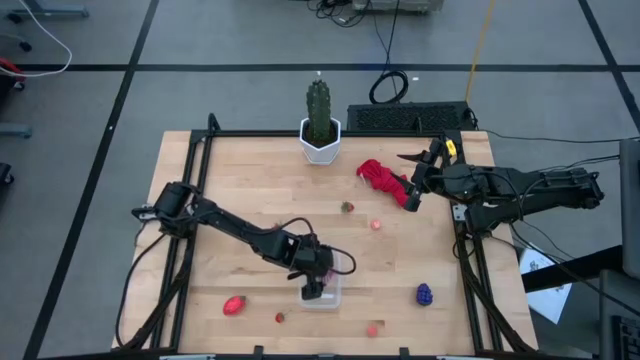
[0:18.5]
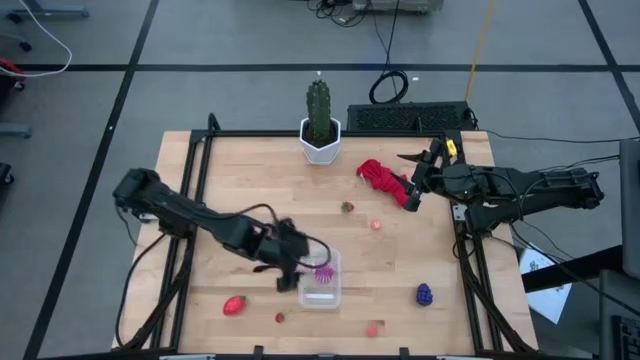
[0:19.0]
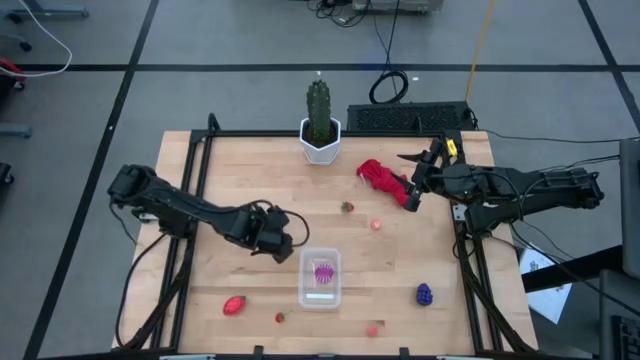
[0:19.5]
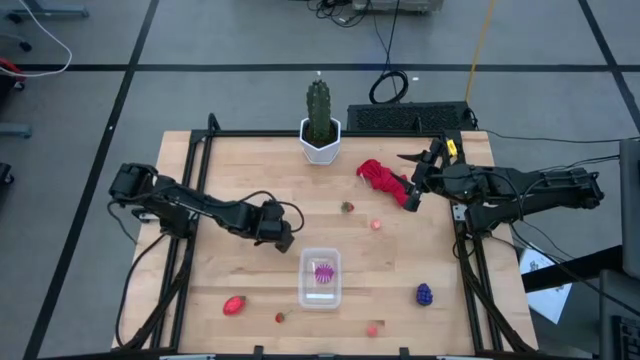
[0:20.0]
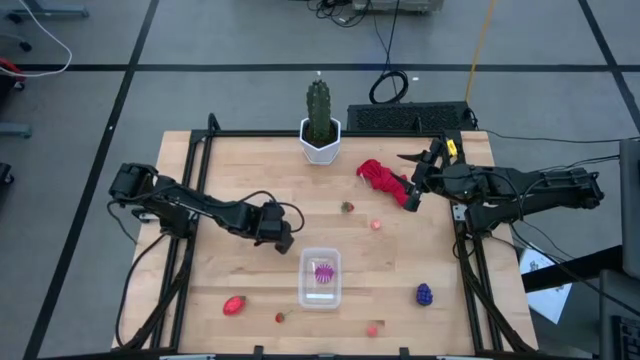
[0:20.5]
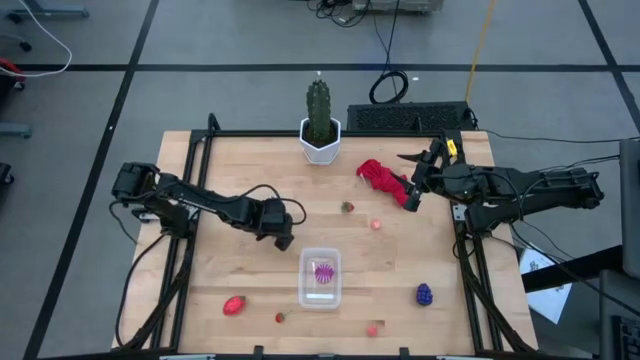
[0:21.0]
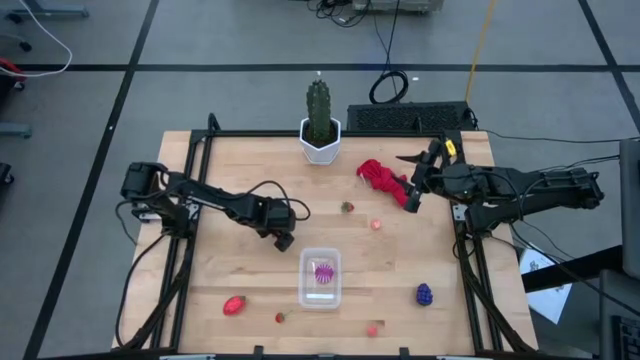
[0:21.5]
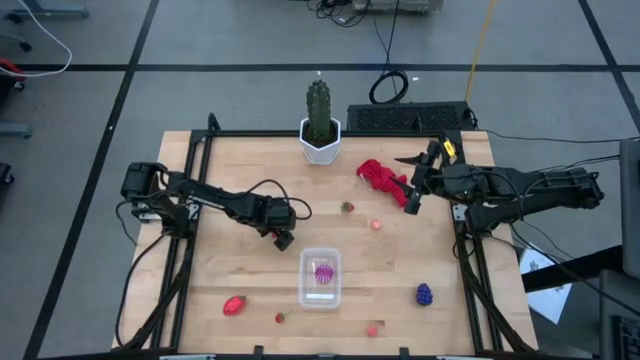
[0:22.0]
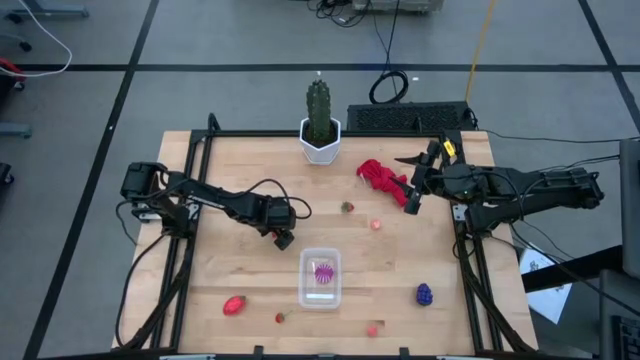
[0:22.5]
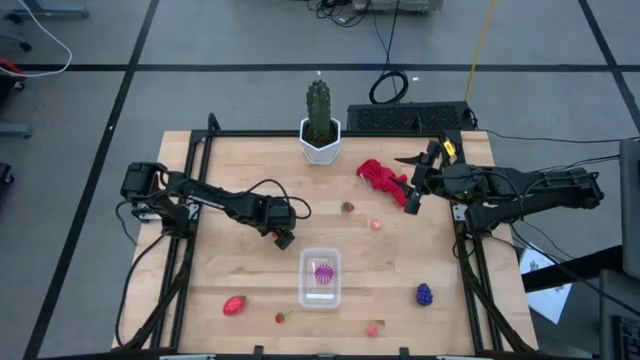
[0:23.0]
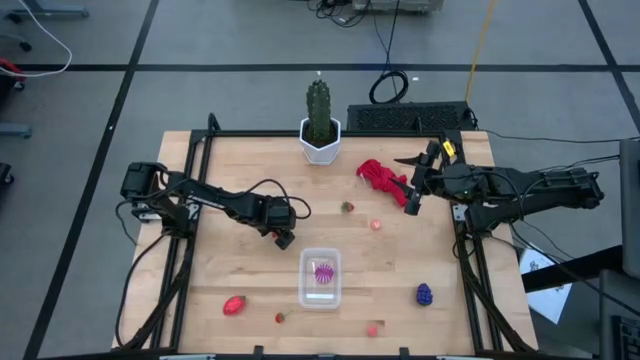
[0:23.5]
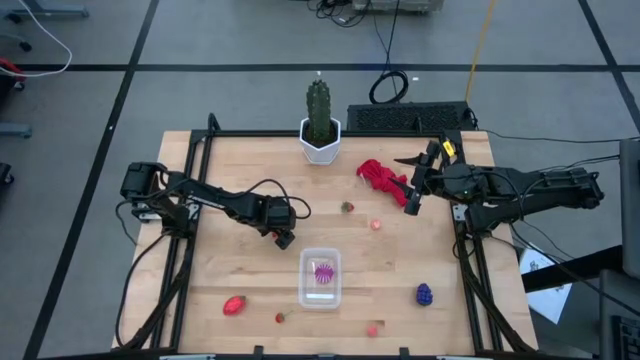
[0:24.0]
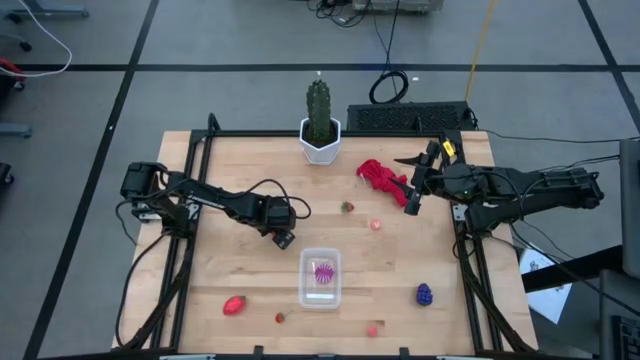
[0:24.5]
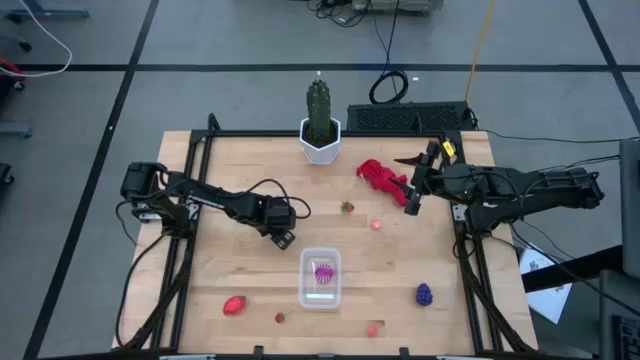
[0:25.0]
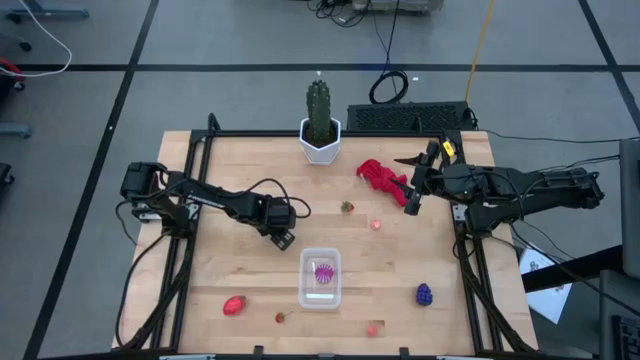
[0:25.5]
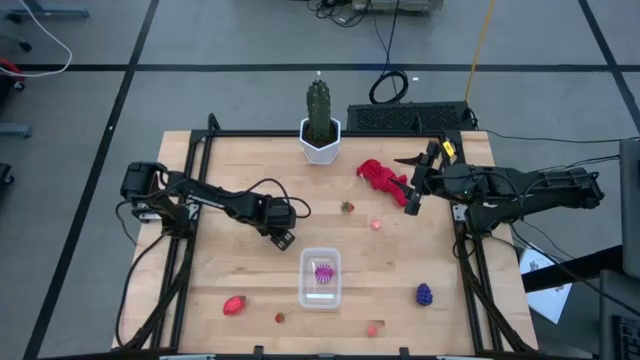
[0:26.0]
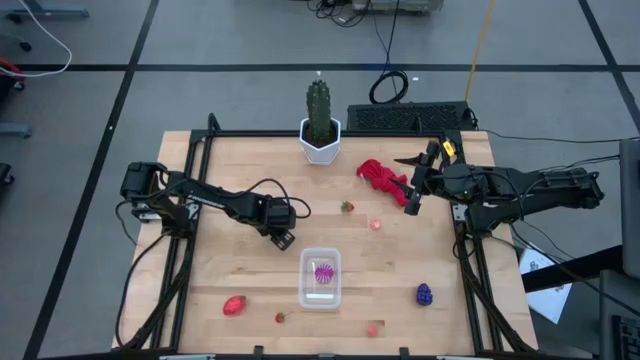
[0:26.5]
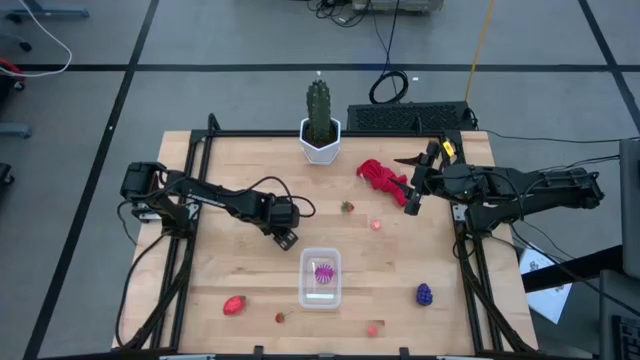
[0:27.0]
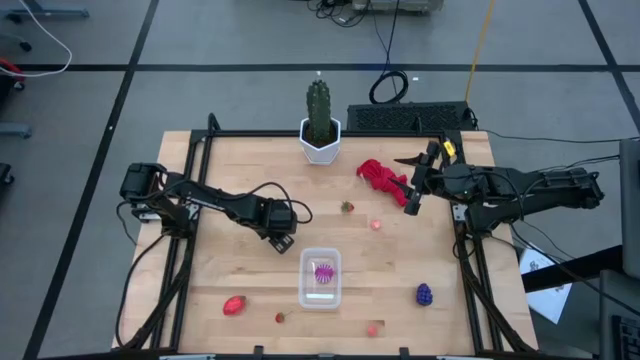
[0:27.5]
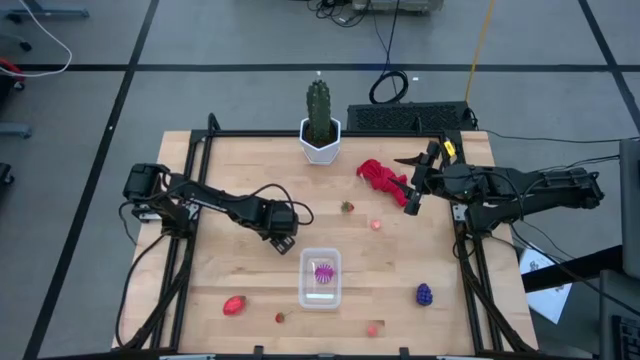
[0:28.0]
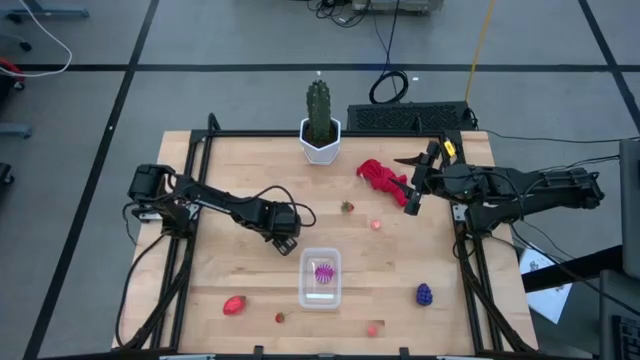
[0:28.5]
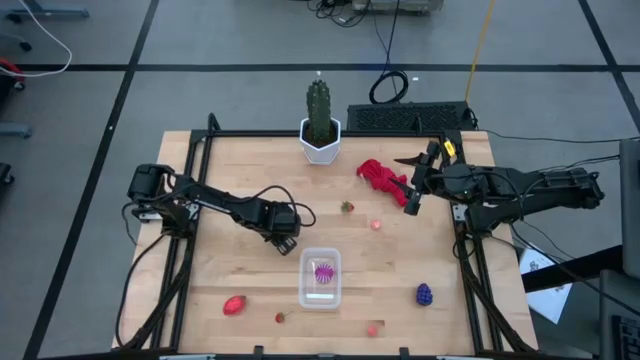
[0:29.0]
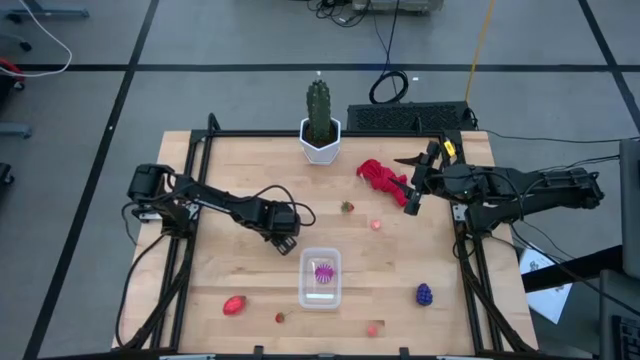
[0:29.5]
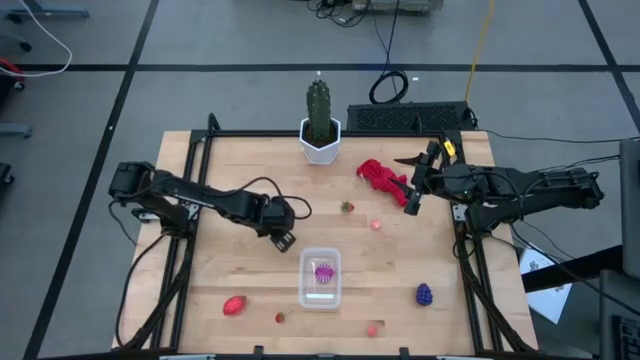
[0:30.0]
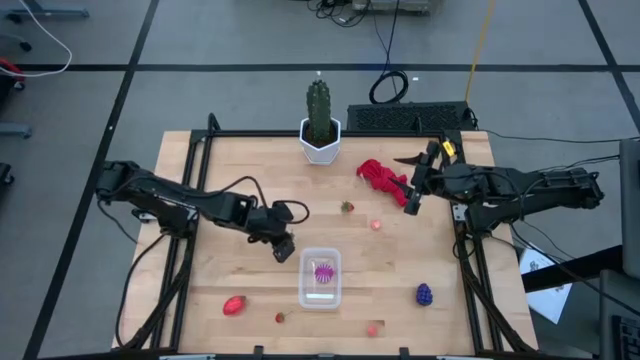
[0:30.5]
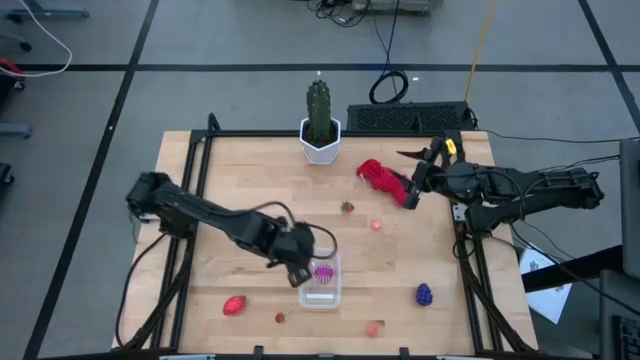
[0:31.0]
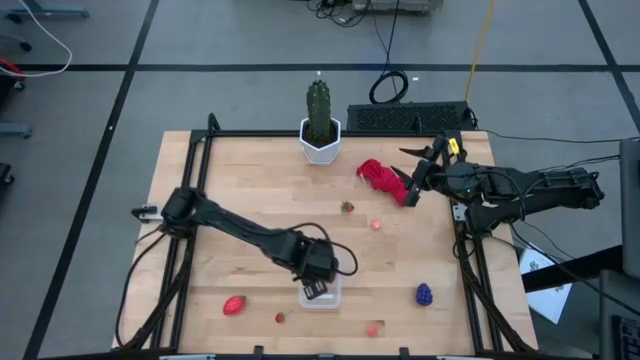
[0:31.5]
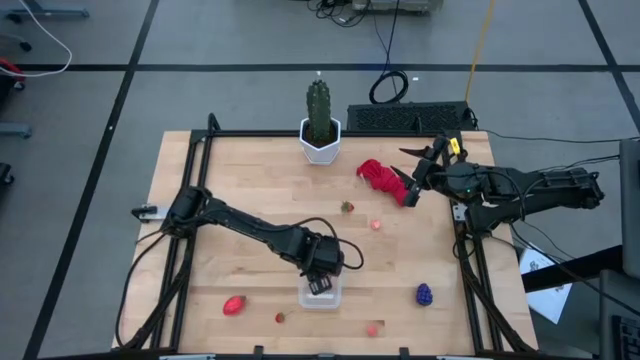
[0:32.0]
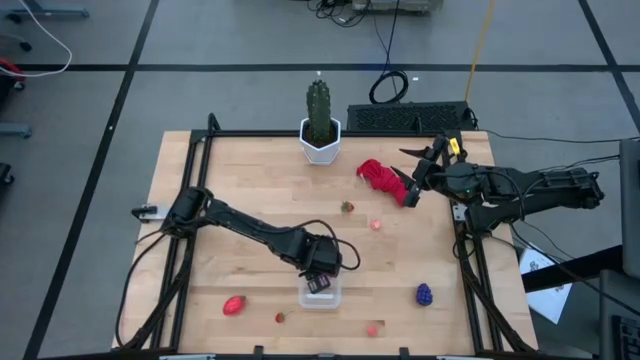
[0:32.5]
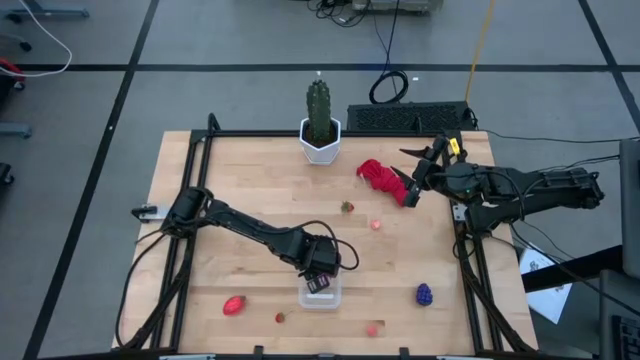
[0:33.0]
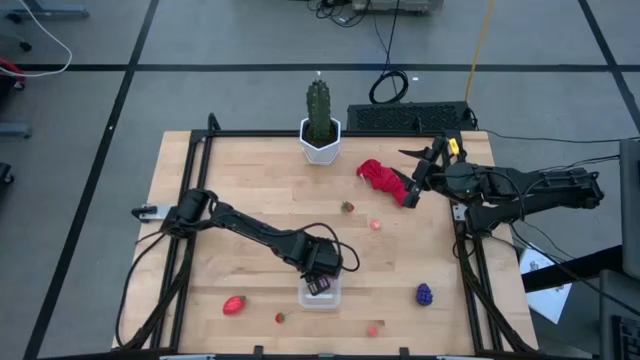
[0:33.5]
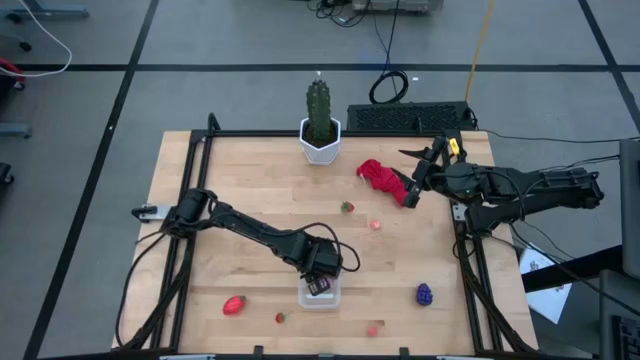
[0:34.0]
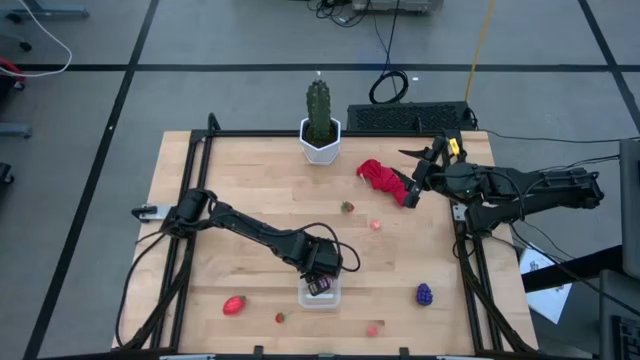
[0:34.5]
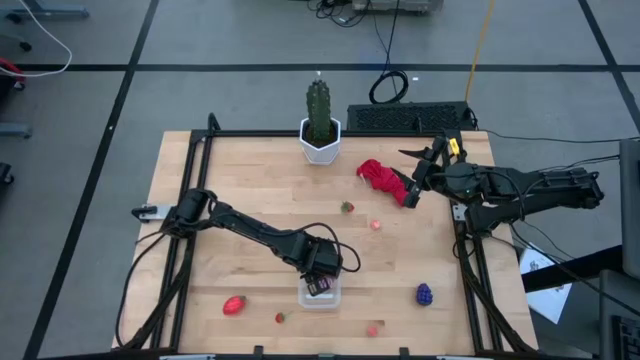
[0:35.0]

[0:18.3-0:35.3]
Task: Pick and placing Produce into tupperware
Put the left strawberry into the transparent container

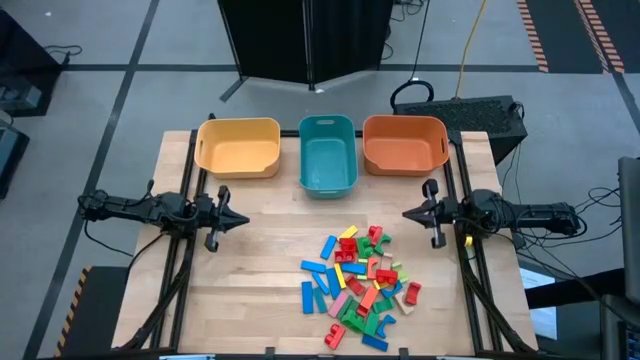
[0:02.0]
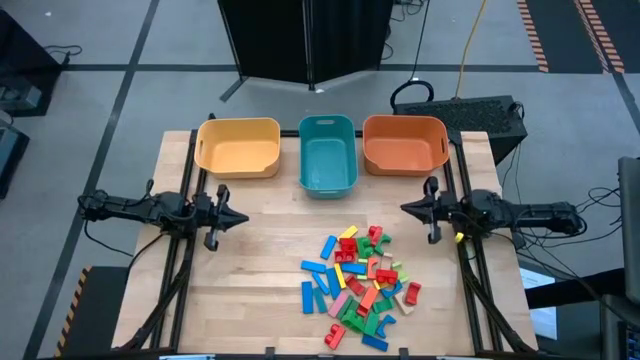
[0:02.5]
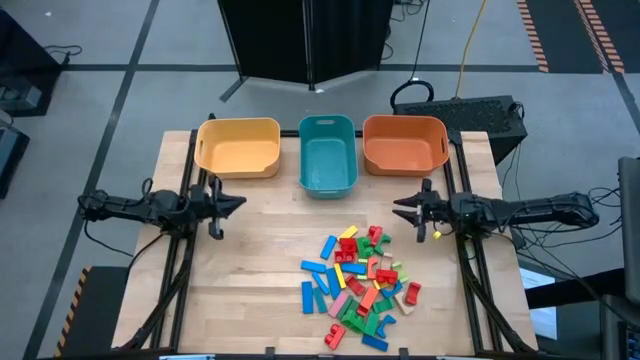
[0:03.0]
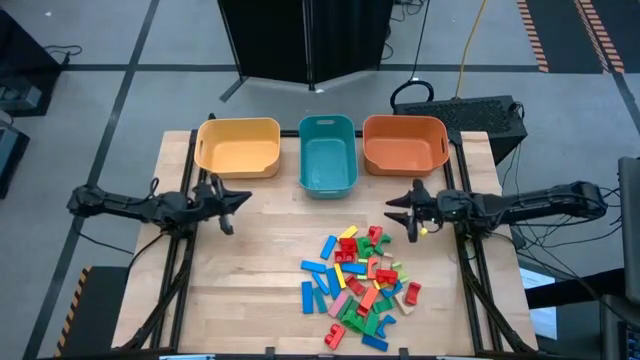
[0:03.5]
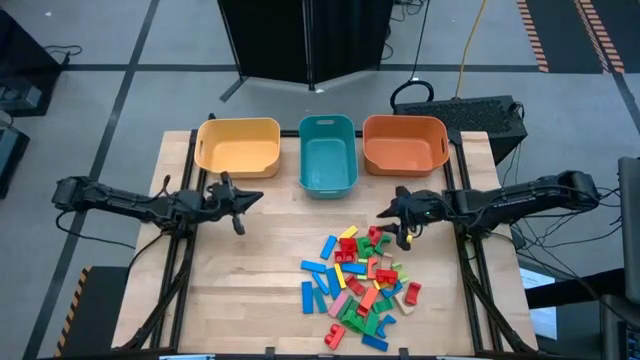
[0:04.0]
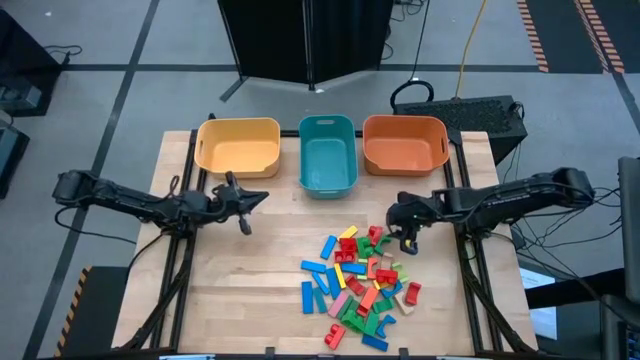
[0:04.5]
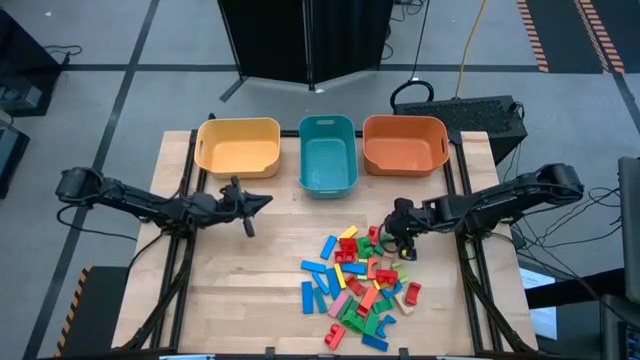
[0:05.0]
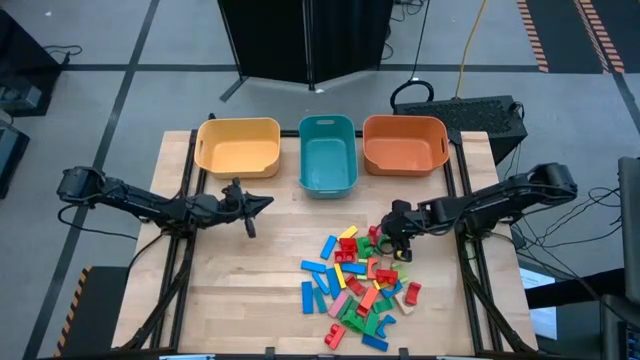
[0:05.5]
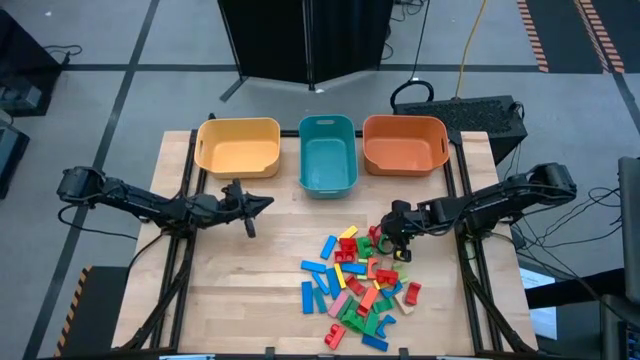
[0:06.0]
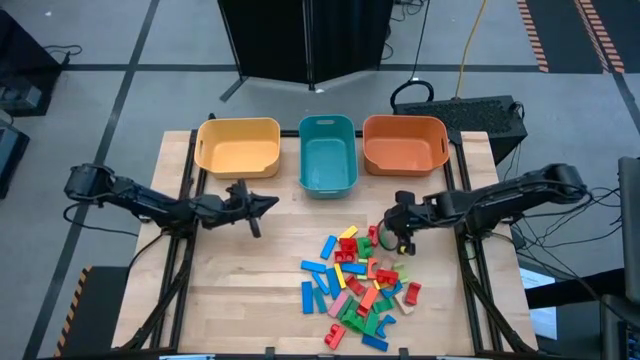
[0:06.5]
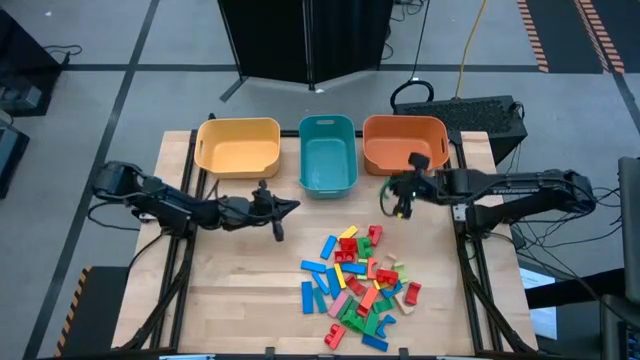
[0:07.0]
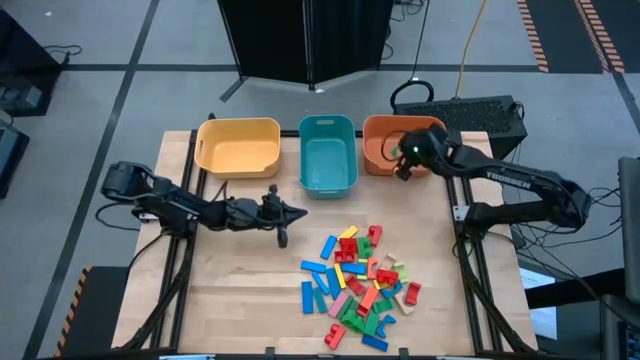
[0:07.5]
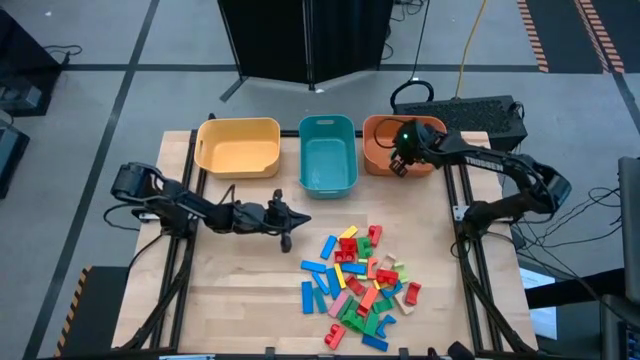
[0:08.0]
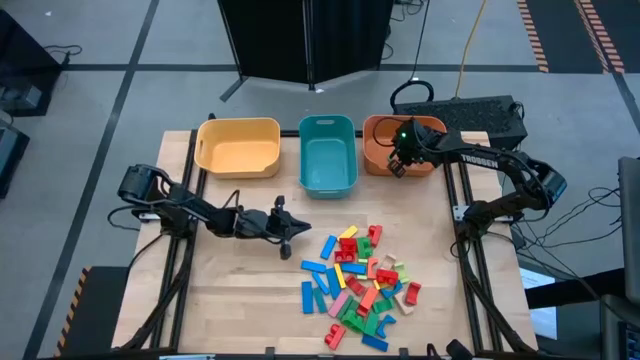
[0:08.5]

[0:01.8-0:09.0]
Task: Sort blocks by size
Put the green arch block into the orange bin
